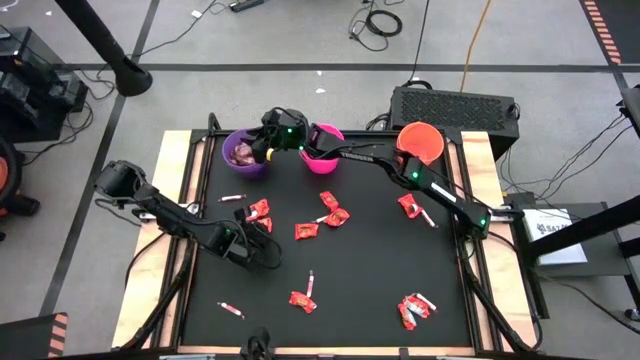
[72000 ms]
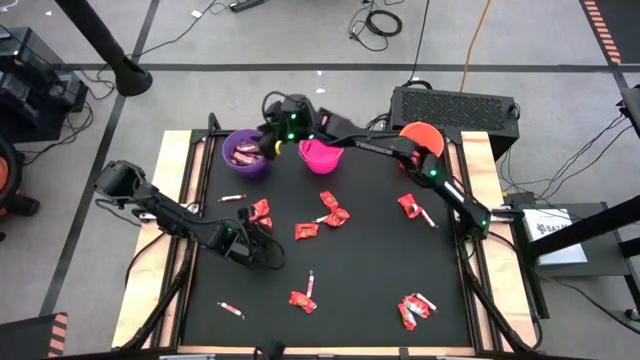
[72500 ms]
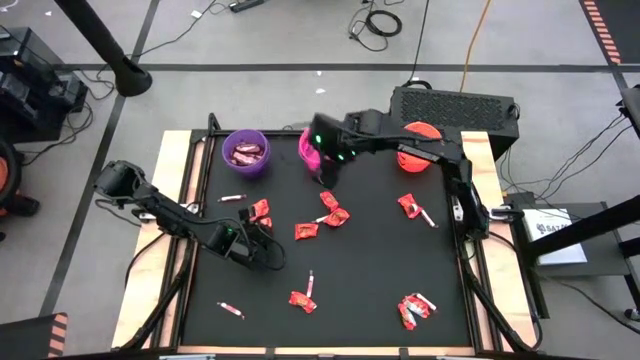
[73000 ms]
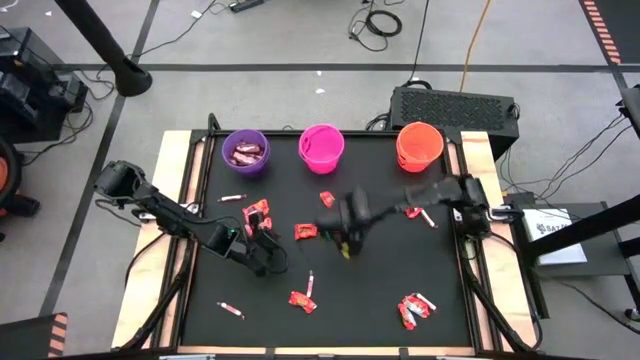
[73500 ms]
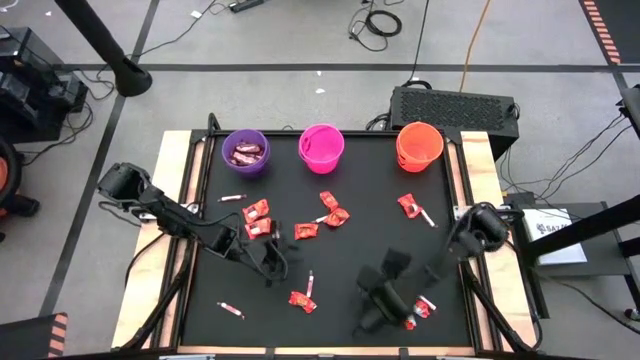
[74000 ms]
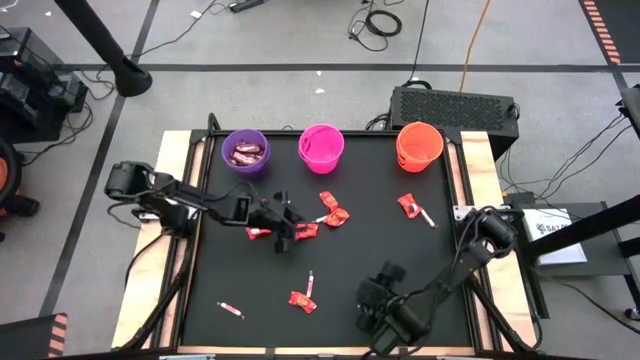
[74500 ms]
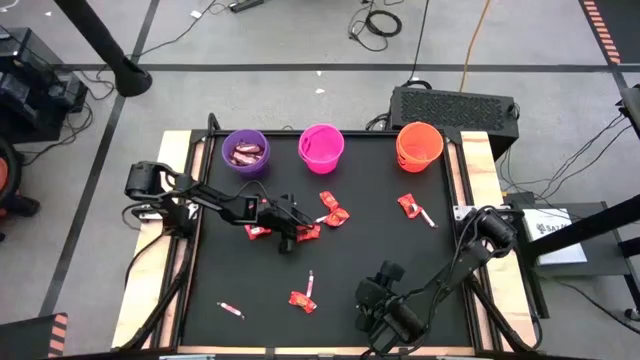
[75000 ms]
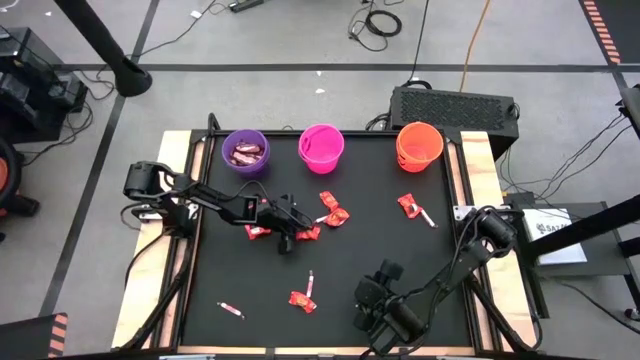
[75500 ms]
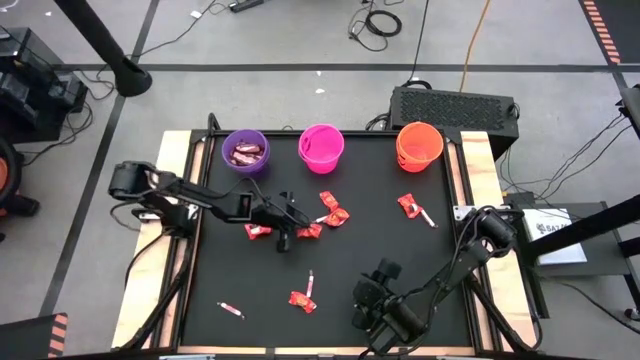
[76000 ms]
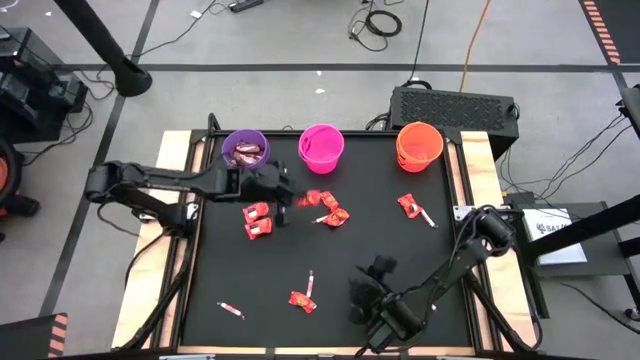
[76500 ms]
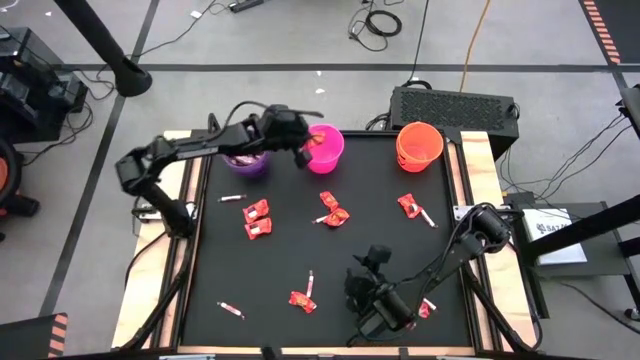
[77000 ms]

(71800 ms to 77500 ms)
Task: Sort candy by brand, put in halloween buckets
Put the red chocolate bar into the pink bucket

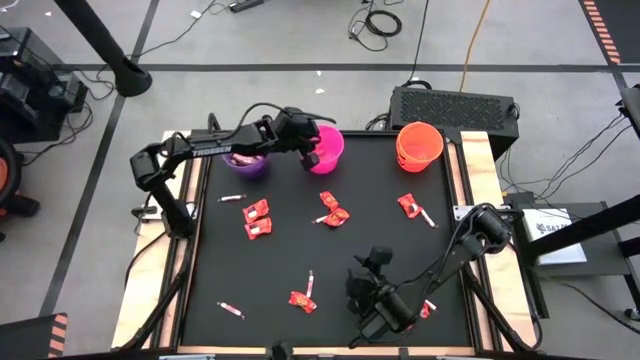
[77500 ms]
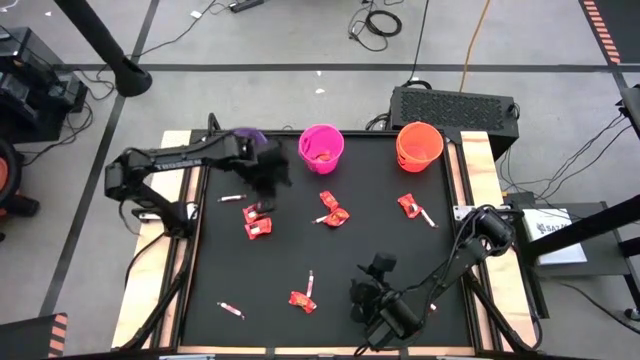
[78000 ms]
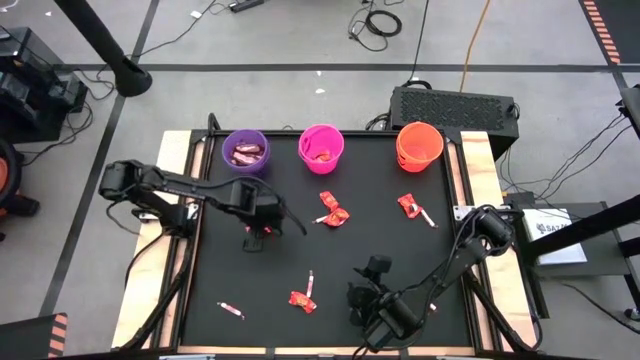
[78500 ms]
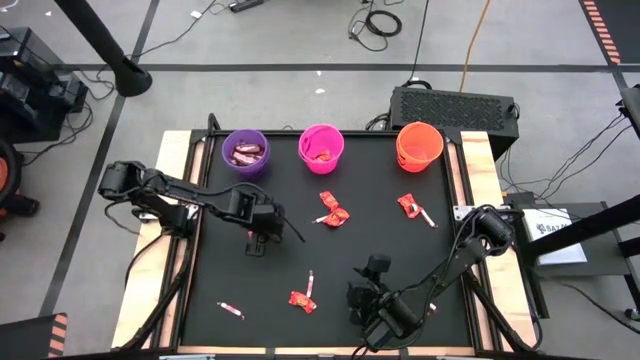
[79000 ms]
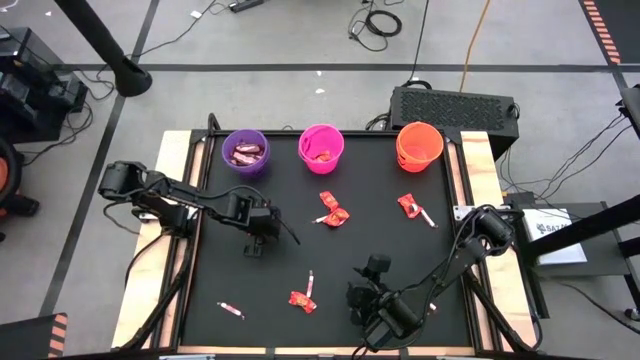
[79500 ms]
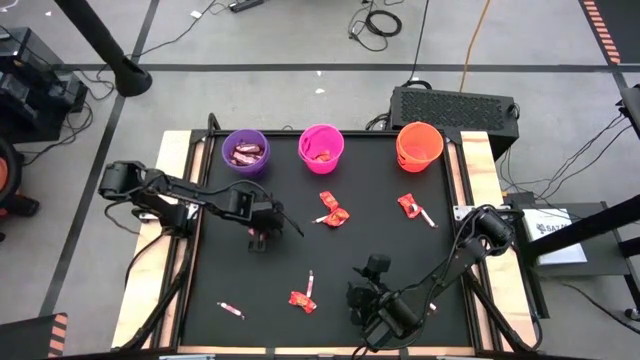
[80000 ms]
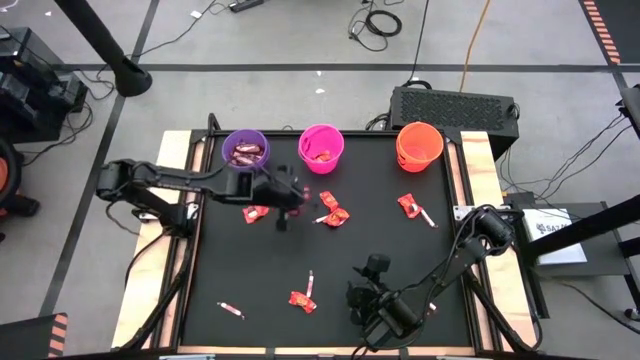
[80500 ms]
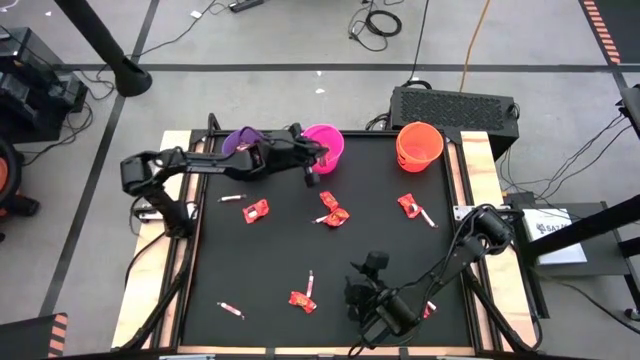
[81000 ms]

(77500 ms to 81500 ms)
Put the red chocolate bar into the pink bucket

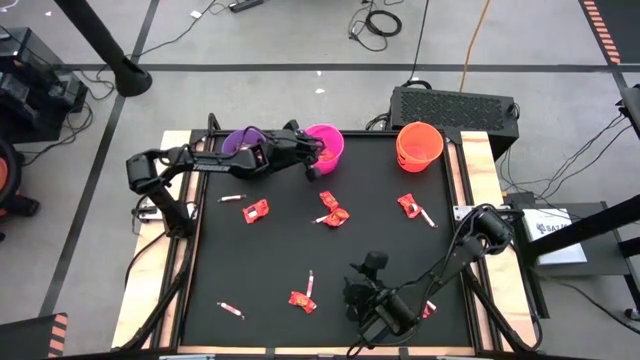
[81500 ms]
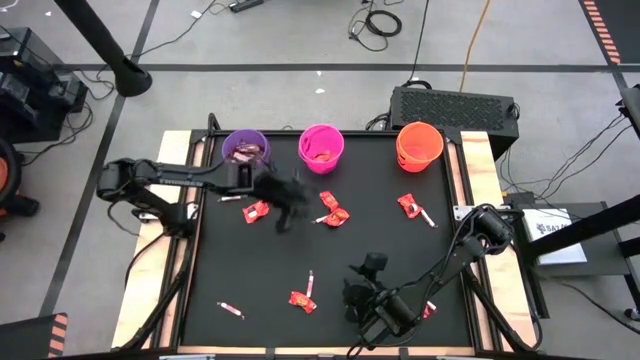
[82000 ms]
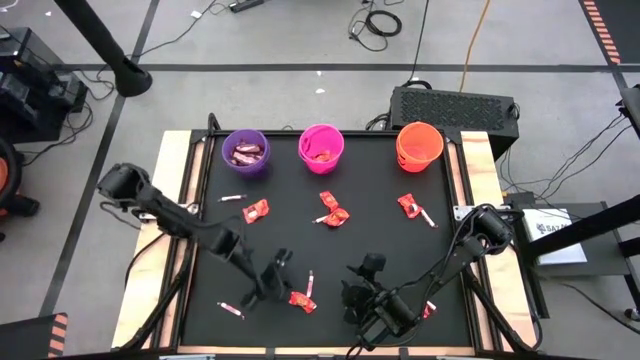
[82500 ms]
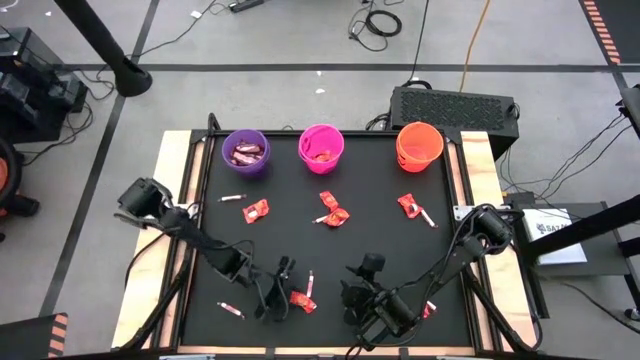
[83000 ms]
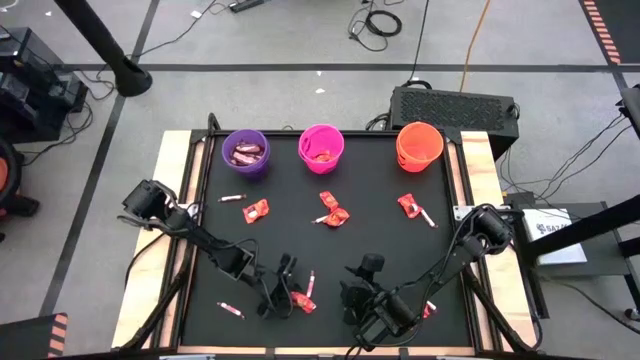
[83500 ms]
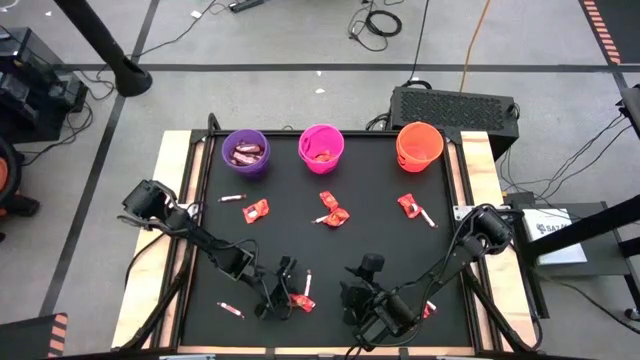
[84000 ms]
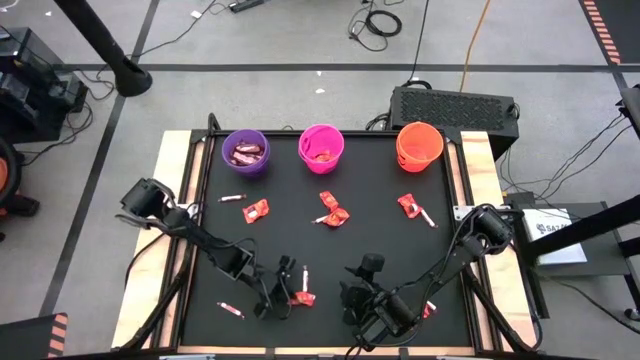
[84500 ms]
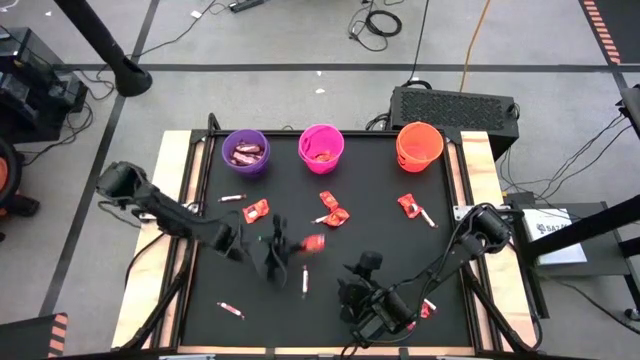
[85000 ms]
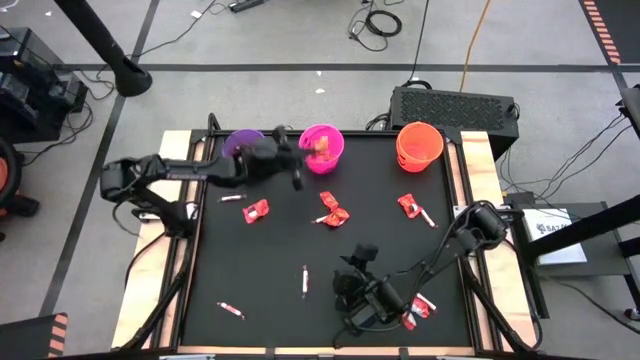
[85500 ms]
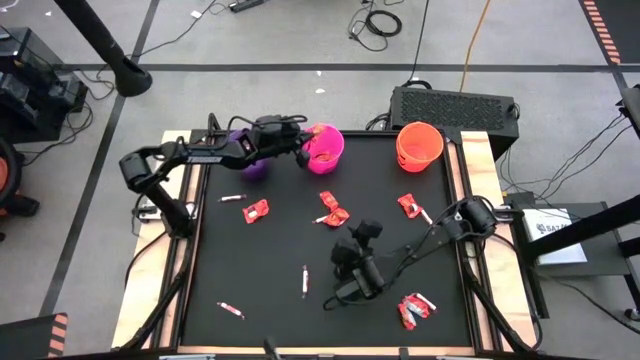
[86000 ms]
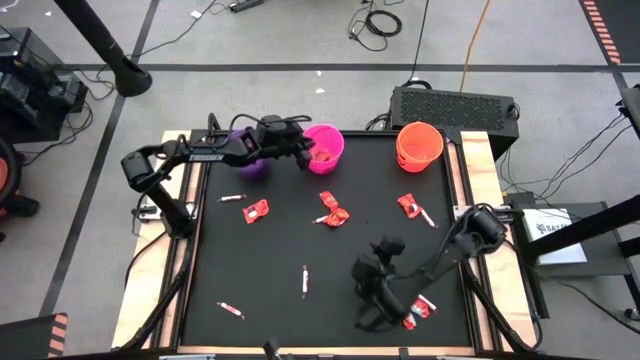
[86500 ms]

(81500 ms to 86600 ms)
Put the red chocolate bar into the pink bucket

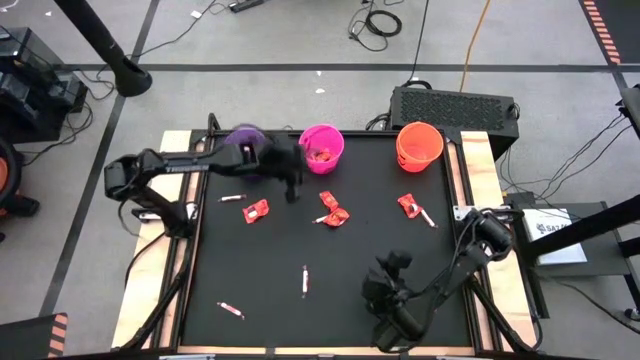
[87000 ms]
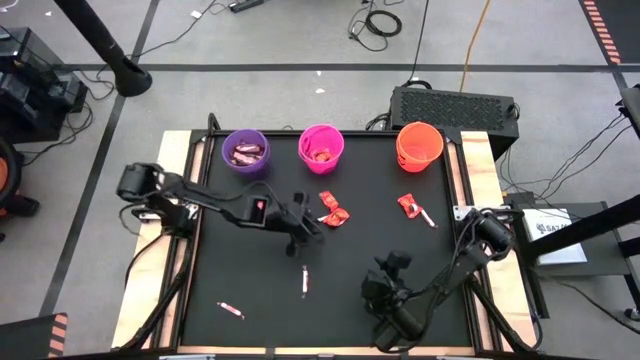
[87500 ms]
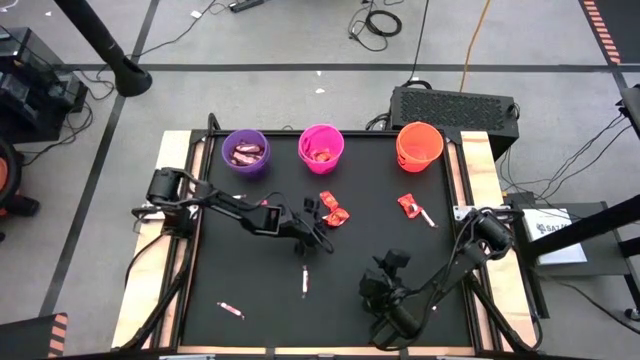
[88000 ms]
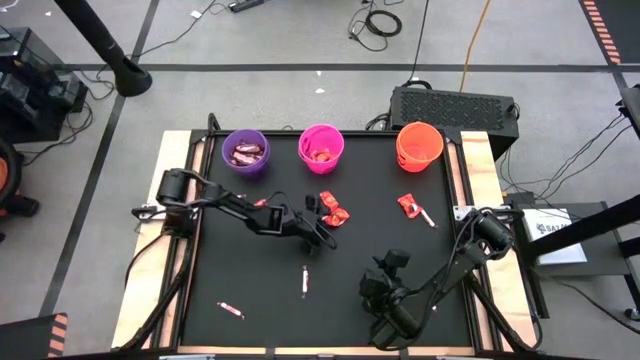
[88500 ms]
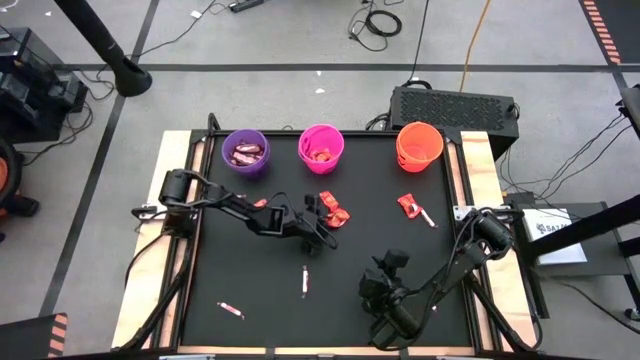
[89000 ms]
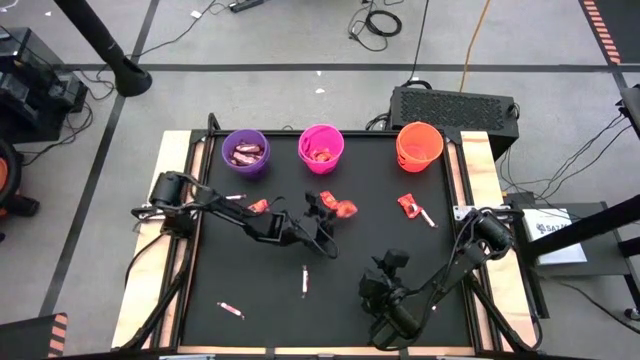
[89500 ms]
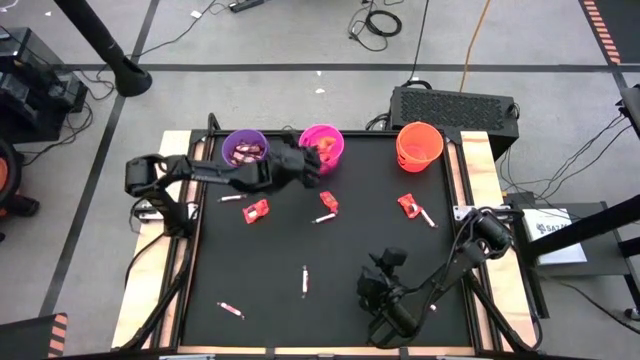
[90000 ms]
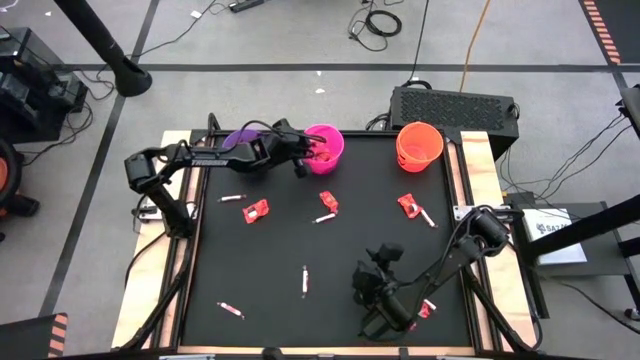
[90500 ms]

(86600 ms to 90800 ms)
Put the red chocolate bar into the pink bucket

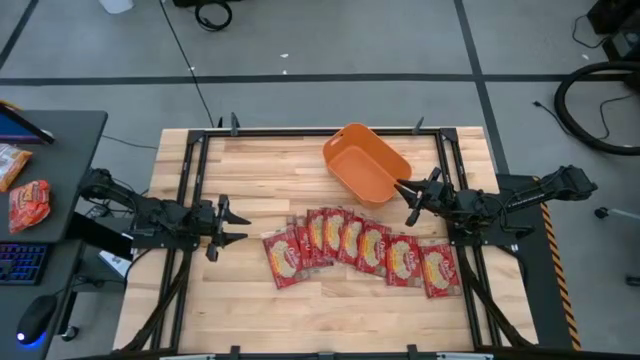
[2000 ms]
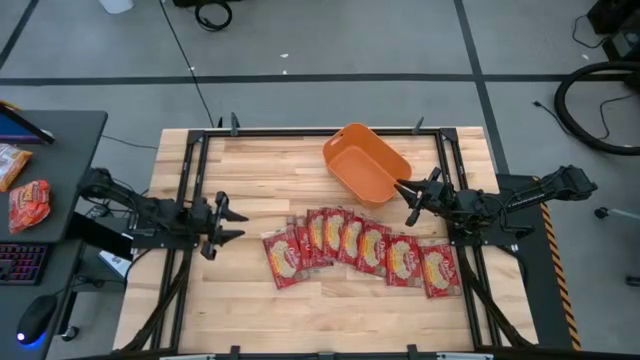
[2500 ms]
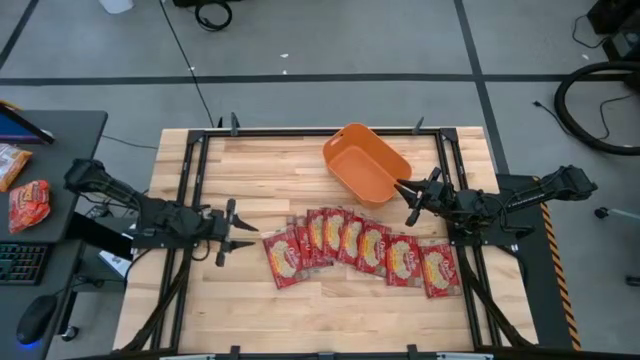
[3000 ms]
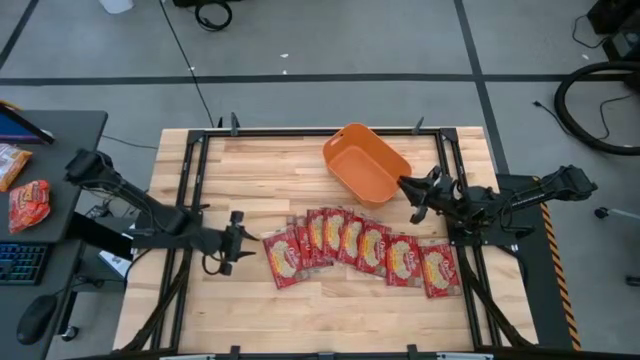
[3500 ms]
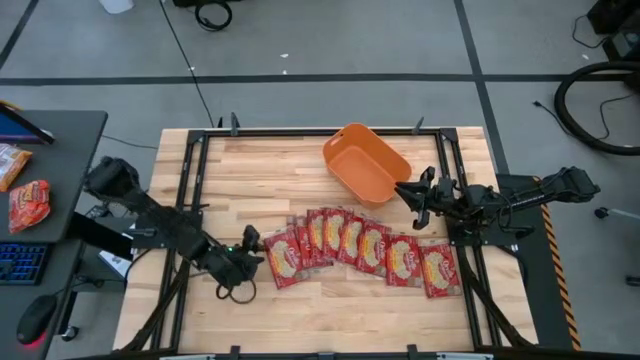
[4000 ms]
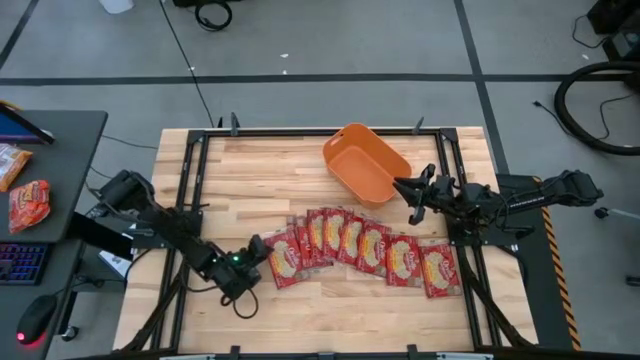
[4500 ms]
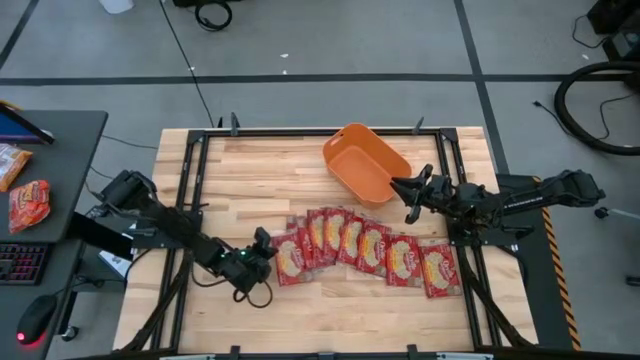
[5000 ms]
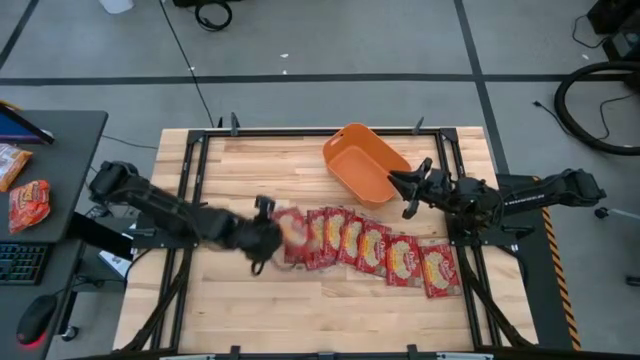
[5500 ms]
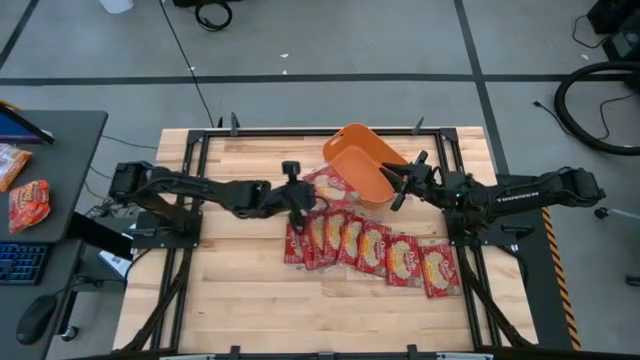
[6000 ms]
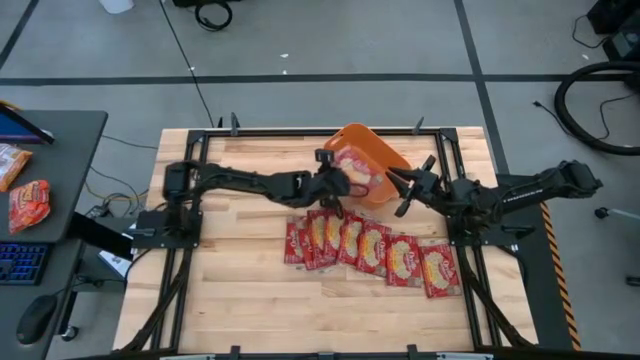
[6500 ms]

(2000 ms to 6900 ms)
Task: Sort popcorn bags into baskets
Put the popcorn bag into the bin
